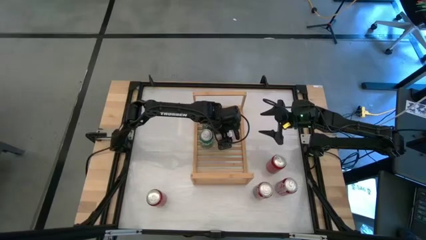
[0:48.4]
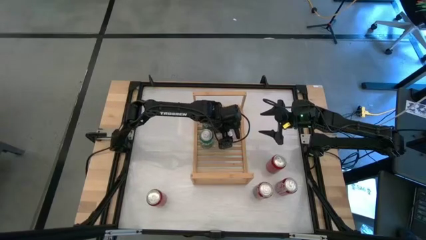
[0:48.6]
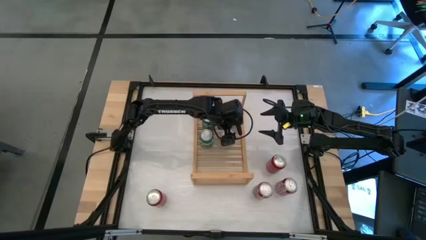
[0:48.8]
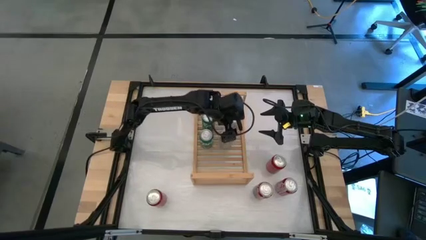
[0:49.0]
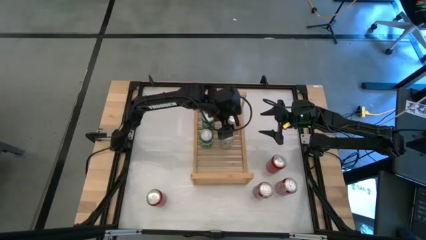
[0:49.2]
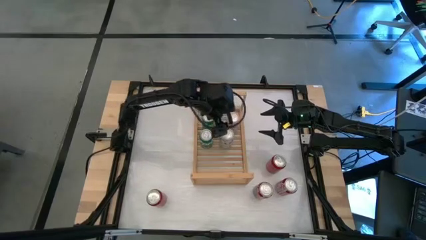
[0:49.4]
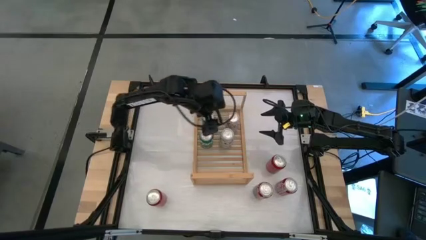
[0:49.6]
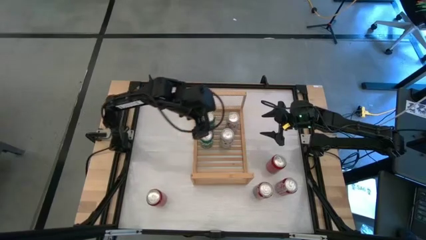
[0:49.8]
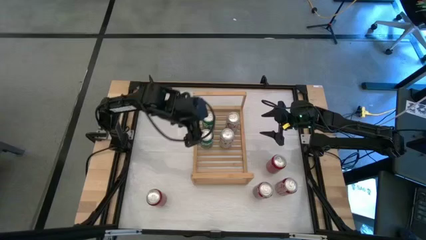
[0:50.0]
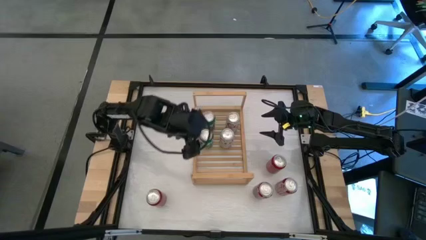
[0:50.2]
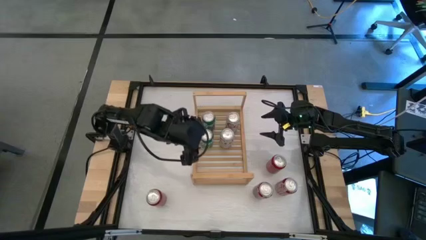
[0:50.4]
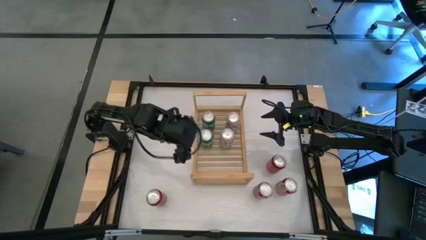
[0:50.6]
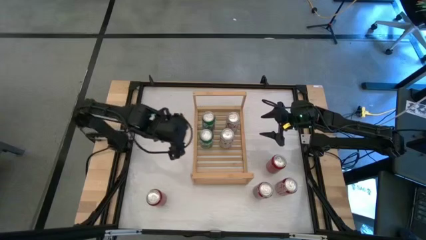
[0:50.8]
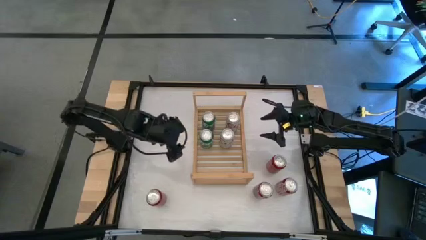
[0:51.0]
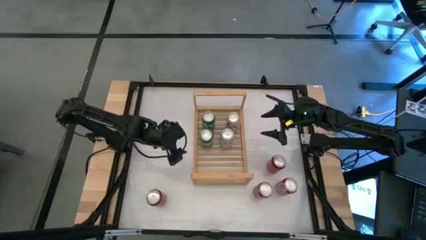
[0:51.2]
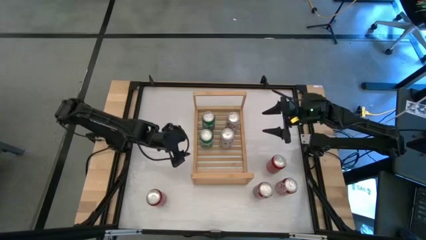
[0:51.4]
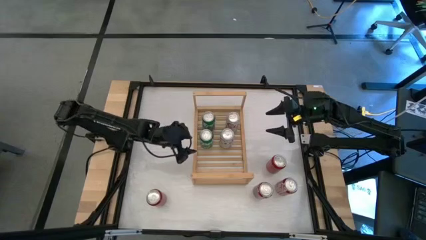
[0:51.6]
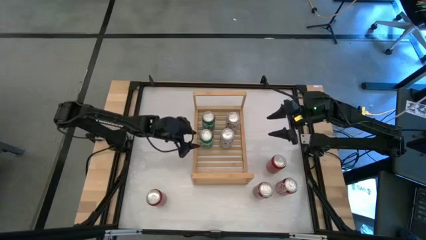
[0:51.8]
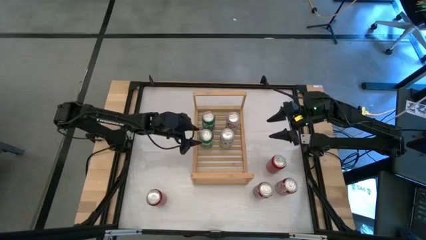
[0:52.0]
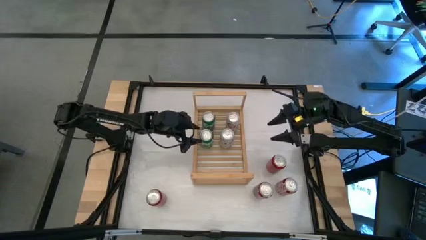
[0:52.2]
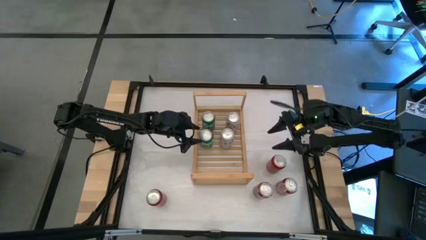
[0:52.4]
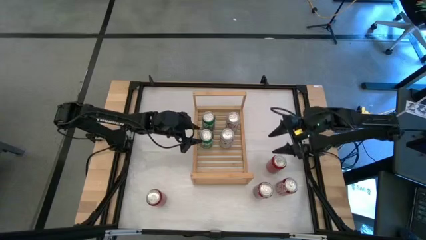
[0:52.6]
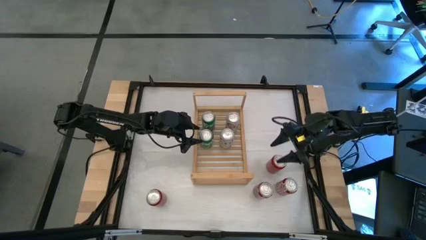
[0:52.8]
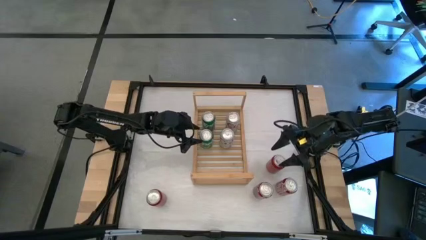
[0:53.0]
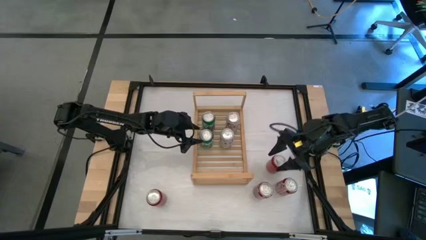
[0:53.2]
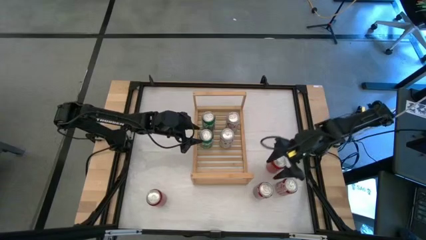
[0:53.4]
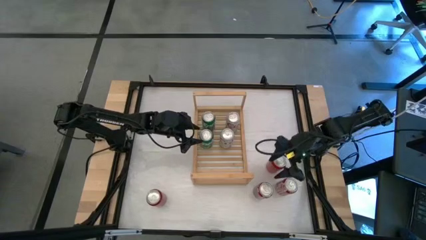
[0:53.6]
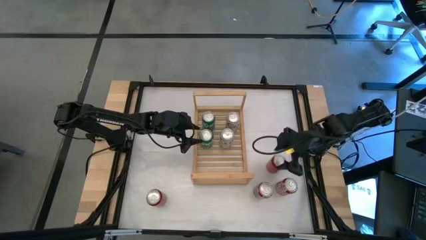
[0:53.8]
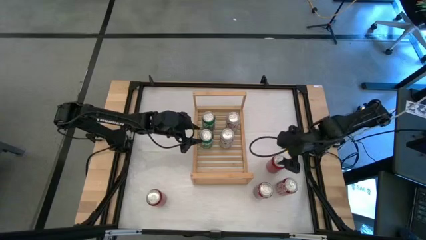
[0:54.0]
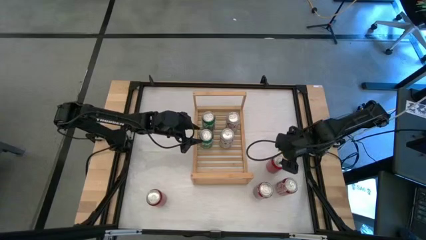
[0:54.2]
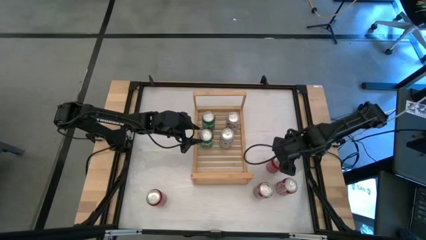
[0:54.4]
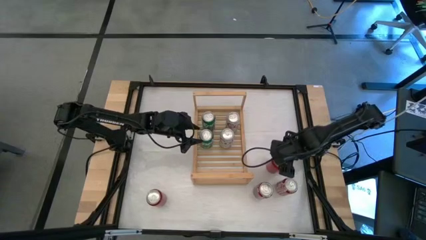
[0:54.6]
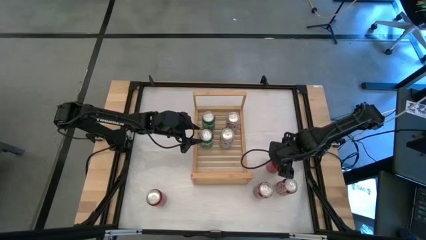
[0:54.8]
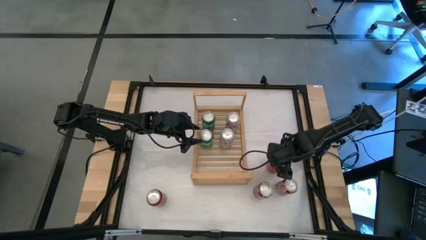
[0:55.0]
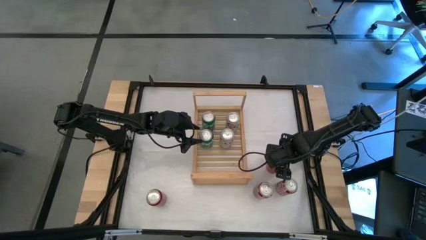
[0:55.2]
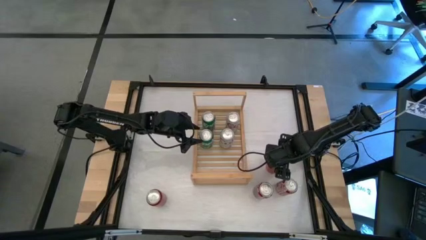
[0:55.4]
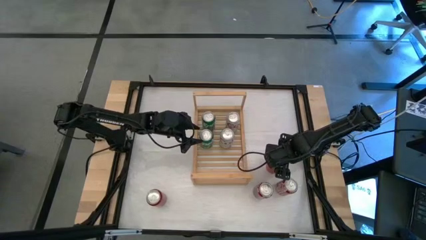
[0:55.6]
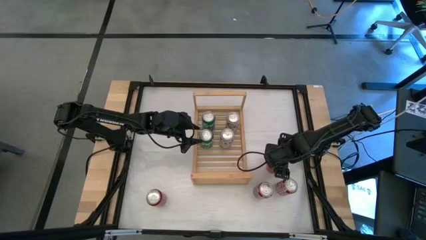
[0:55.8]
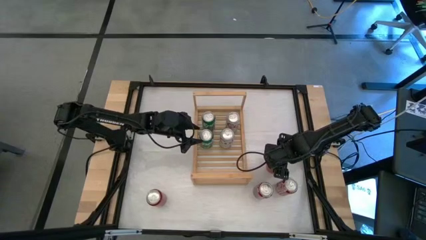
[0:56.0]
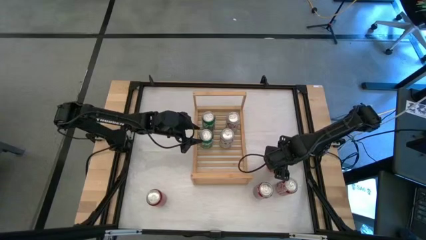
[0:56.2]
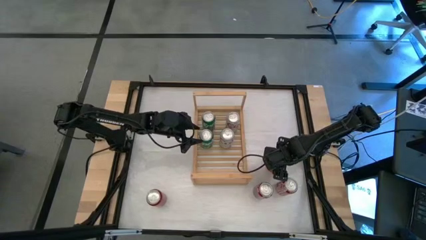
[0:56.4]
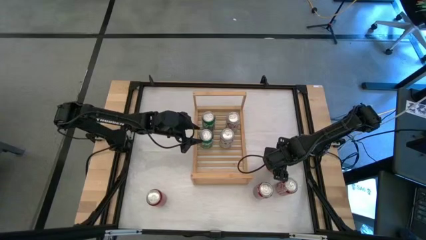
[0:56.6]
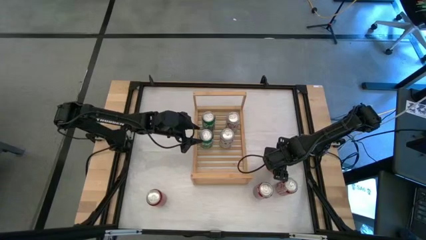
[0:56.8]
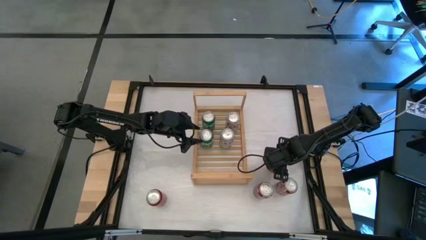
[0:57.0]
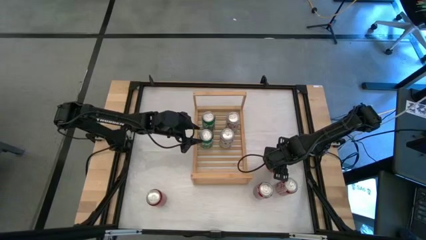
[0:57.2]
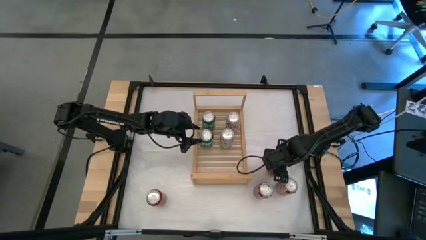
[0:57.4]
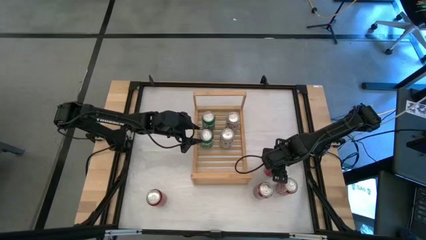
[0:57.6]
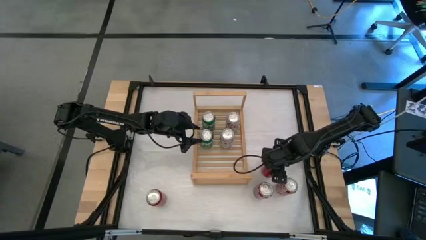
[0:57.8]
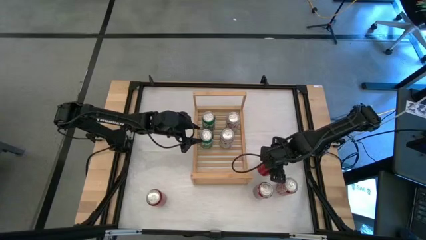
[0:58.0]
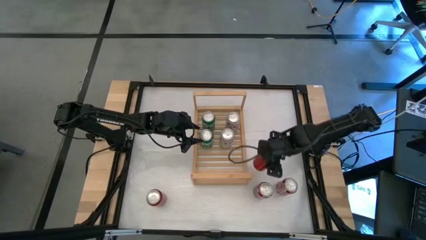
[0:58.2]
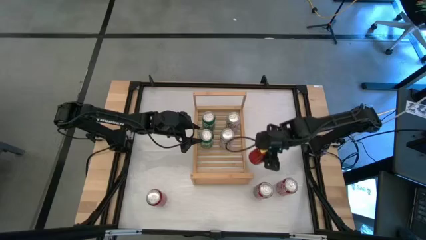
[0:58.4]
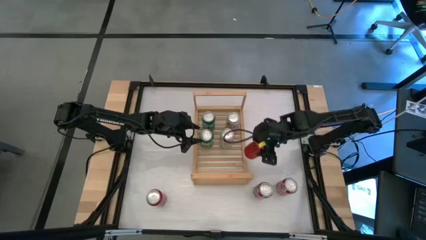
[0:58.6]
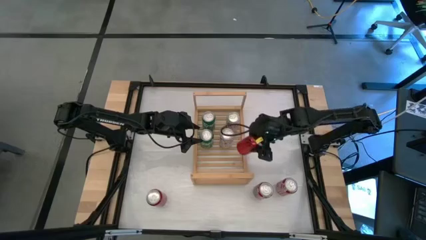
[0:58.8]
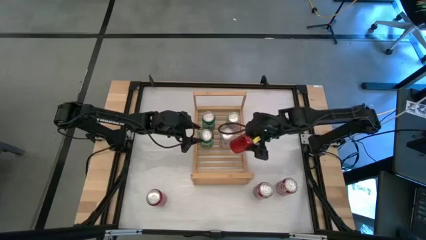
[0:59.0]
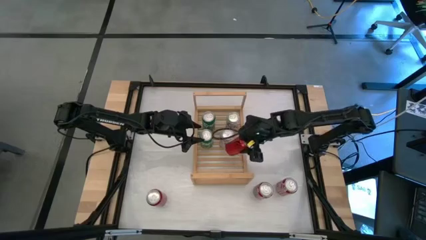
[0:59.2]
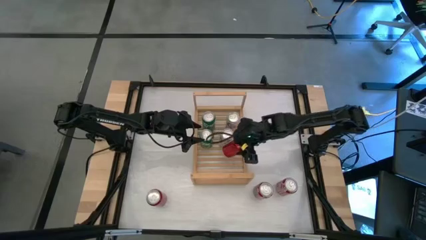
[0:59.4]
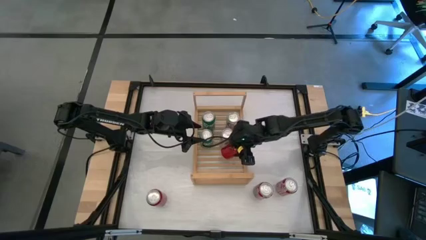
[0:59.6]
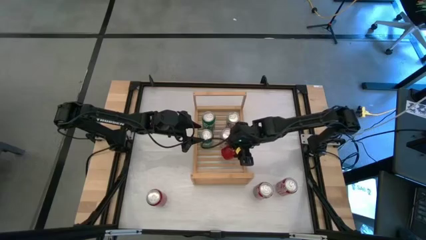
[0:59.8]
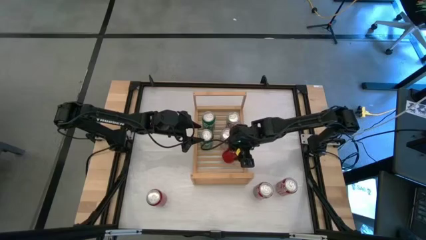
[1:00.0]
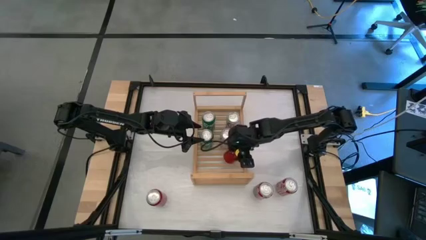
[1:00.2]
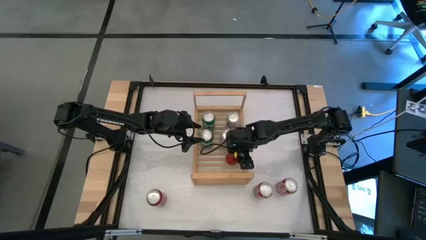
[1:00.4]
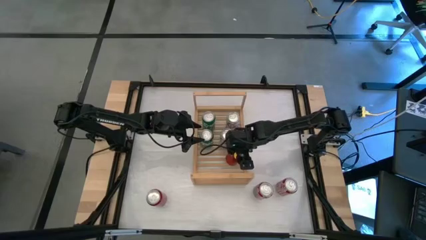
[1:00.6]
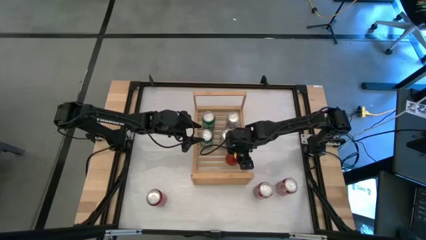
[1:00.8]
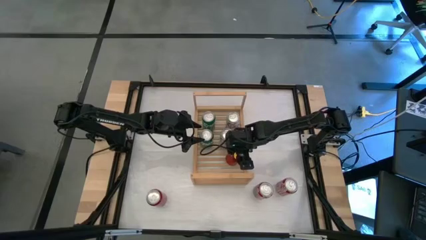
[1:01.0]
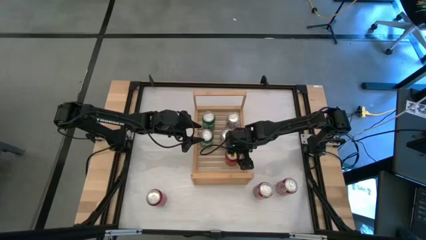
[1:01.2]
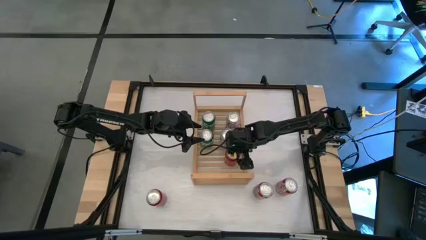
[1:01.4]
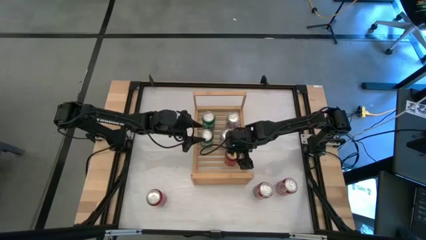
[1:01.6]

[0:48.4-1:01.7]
Task: Place canned beverage on shelf
Put the top right red soda can on the shelf

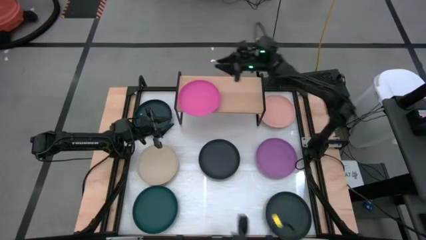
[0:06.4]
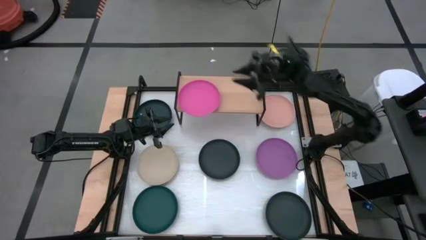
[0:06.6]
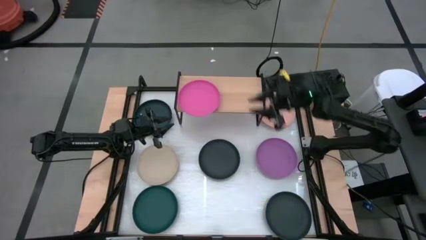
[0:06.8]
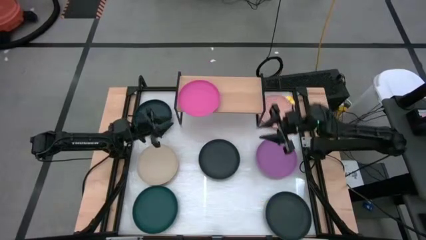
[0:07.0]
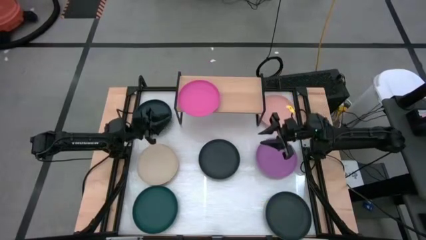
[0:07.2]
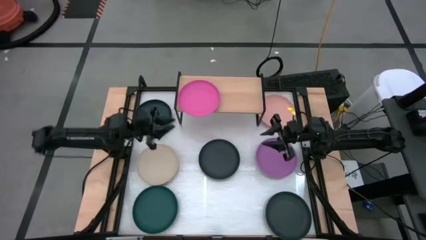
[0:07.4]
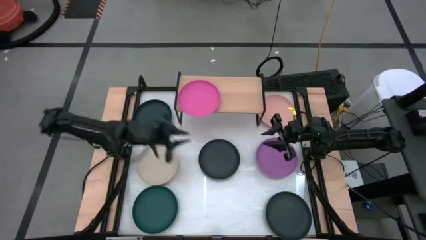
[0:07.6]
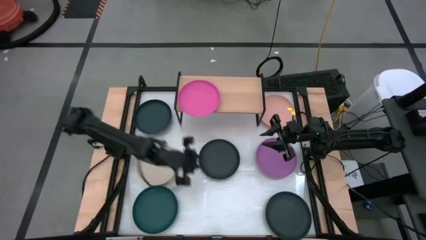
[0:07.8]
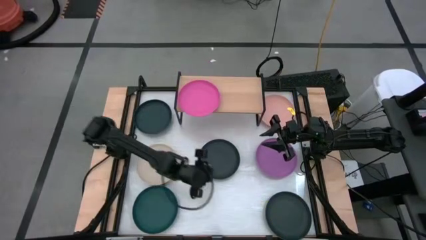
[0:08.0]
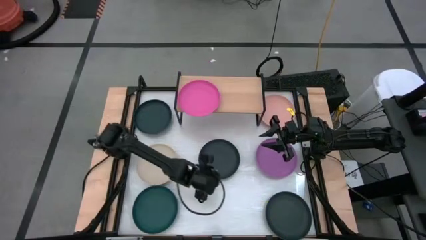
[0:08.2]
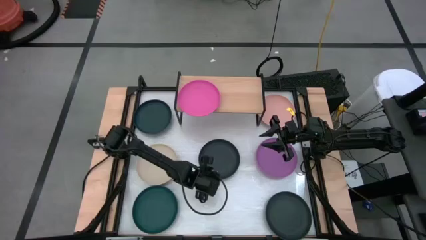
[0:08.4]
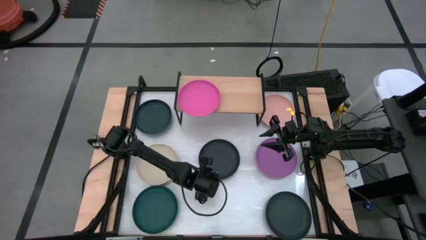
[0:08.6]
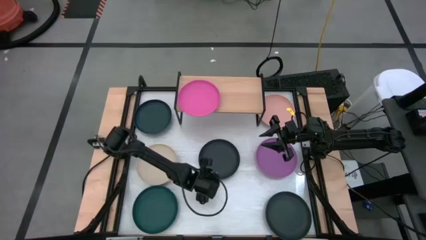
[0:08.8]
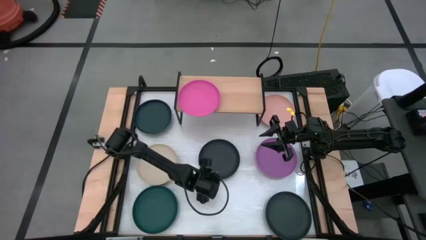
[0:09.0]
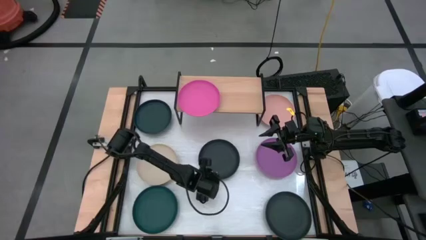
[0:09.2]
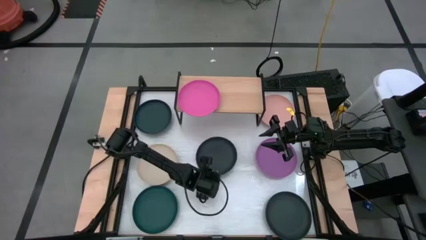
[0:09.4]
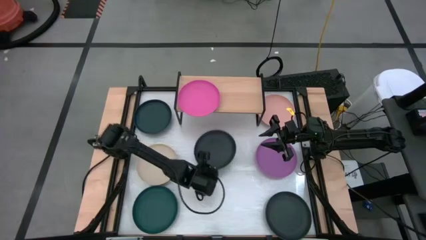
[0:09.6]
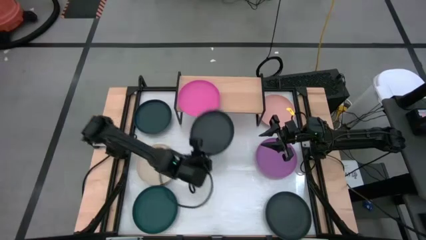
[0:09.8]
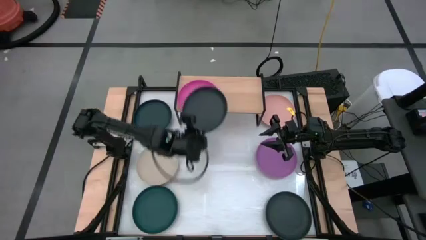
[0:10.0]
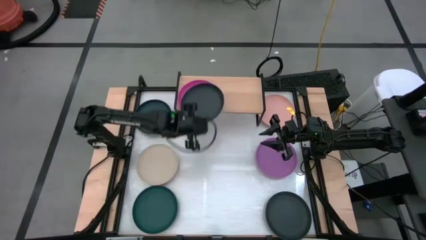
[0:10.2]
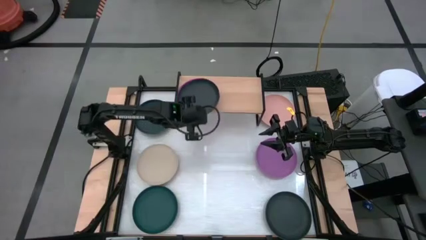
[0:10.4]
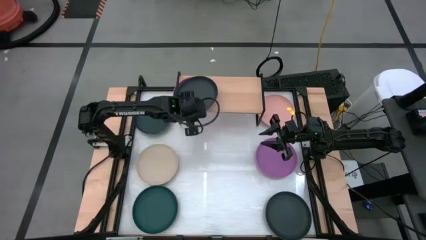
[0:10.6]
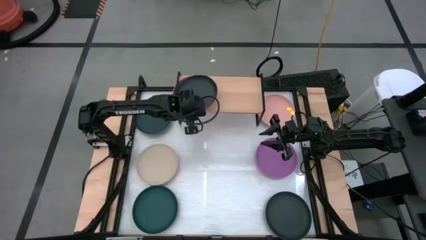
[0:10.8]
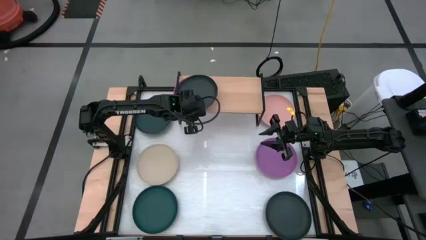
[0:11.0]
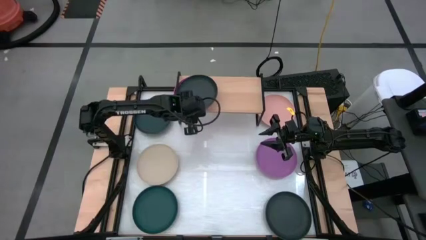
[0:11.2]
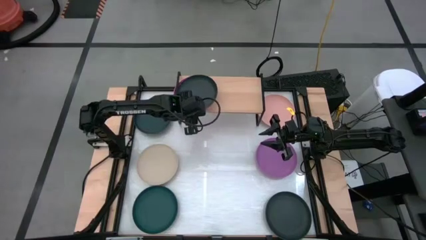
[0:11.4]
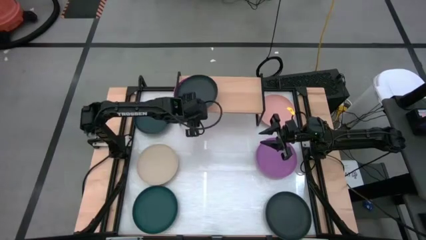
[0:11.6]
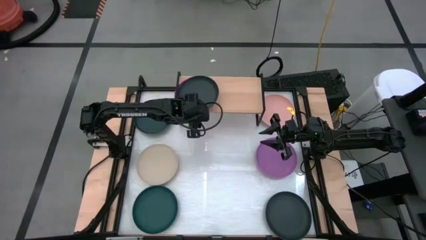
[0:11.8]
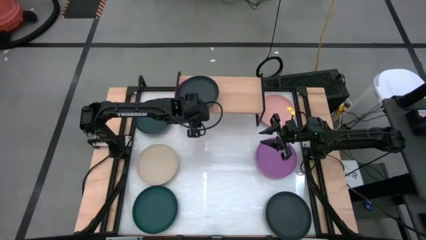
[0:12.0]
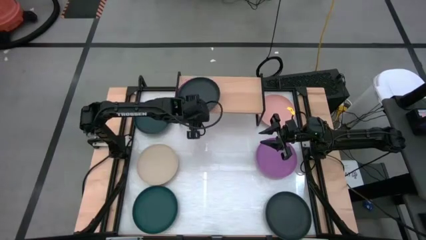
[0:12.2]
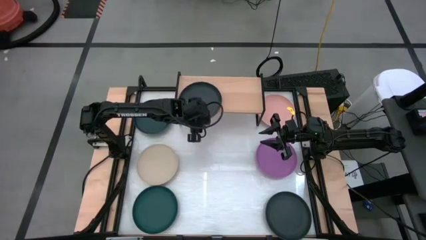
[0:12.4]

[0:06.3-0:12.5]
Task: Place and stack plates onto a shelf
Stack the center black plate on top of the pink plate on the shelf
